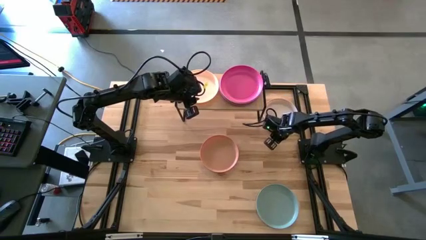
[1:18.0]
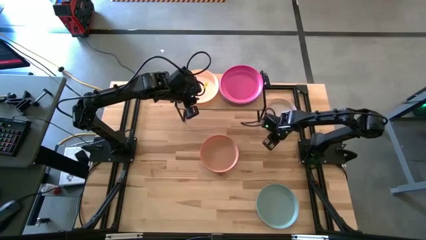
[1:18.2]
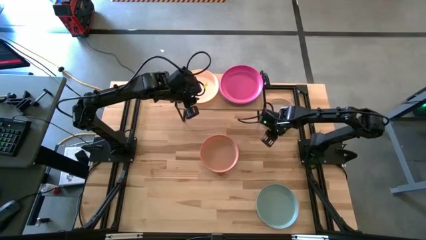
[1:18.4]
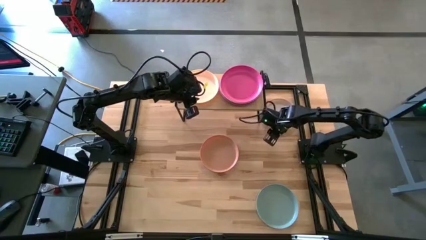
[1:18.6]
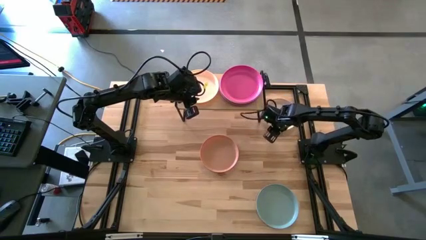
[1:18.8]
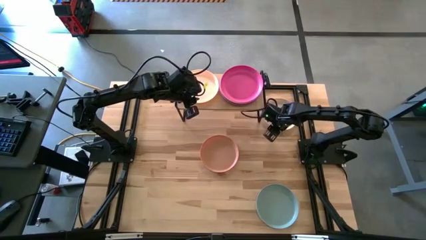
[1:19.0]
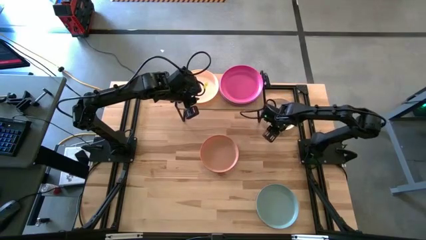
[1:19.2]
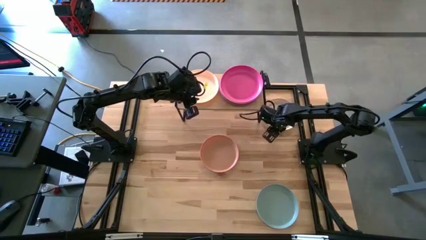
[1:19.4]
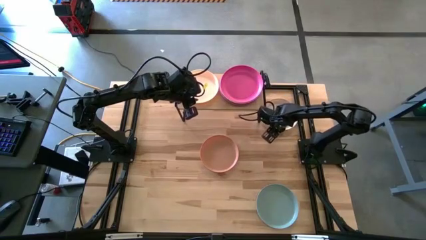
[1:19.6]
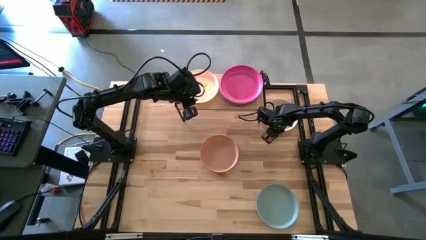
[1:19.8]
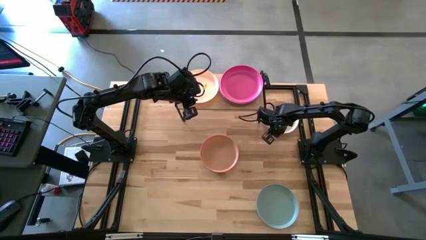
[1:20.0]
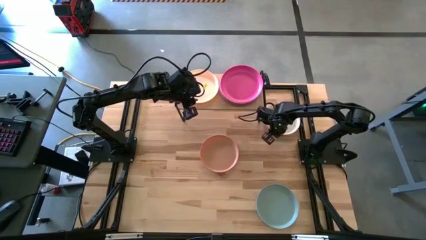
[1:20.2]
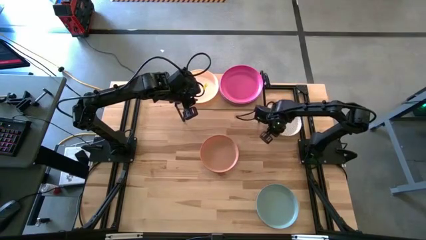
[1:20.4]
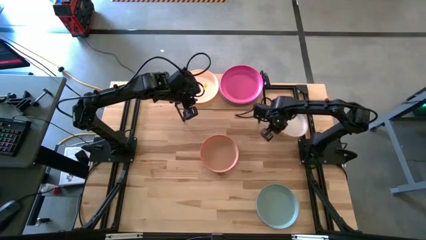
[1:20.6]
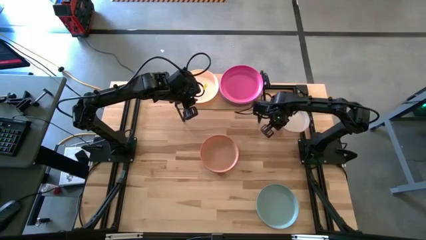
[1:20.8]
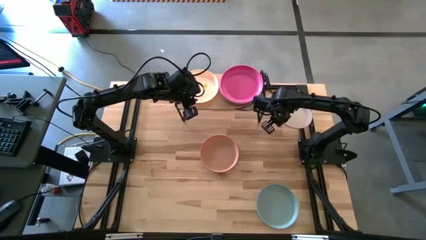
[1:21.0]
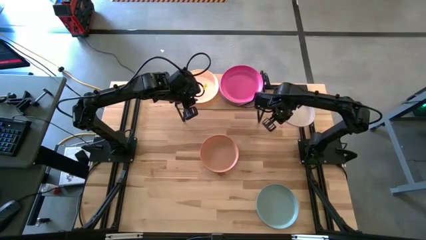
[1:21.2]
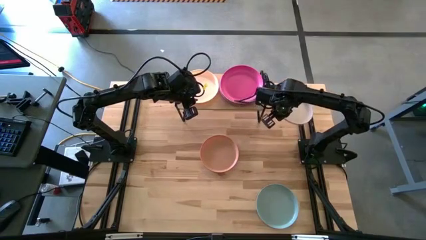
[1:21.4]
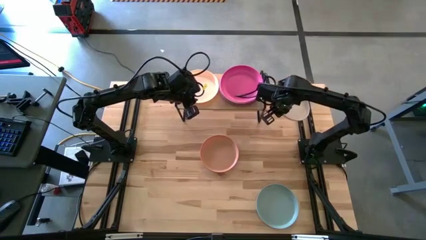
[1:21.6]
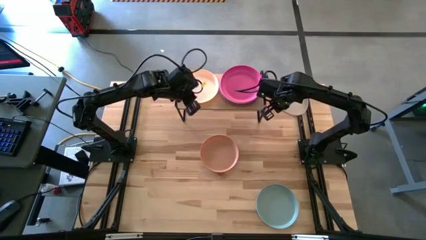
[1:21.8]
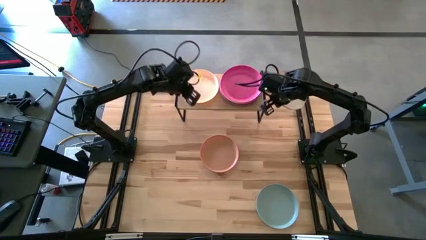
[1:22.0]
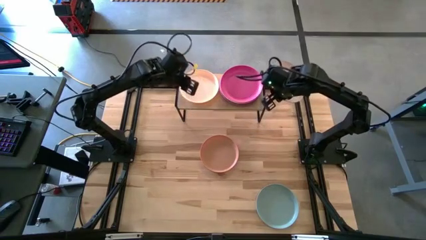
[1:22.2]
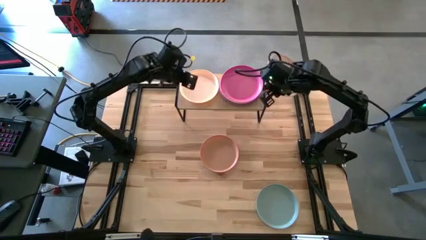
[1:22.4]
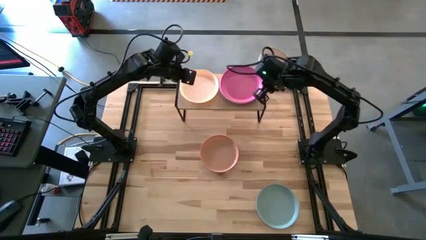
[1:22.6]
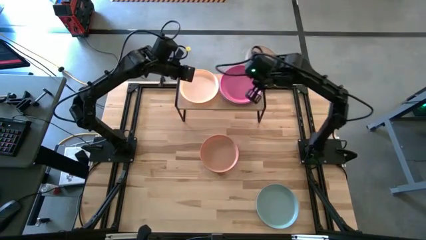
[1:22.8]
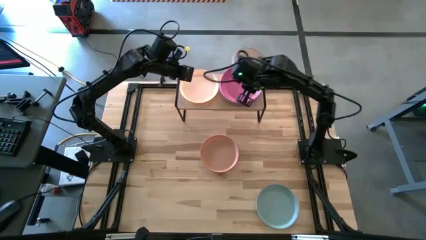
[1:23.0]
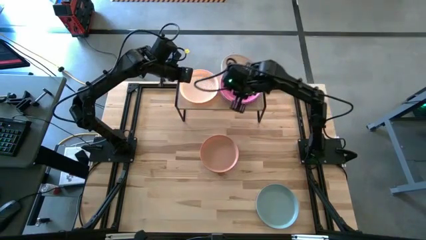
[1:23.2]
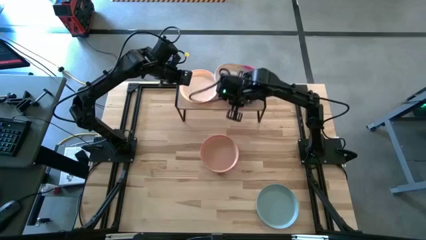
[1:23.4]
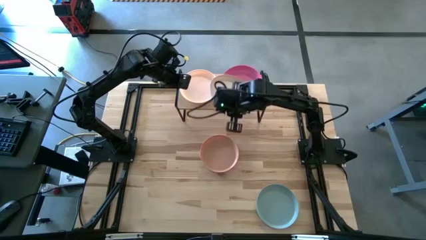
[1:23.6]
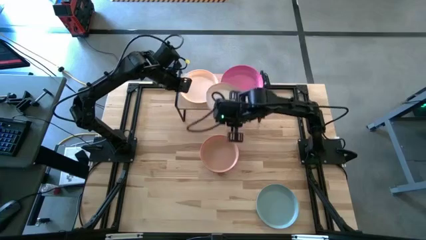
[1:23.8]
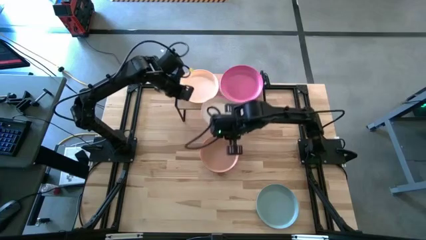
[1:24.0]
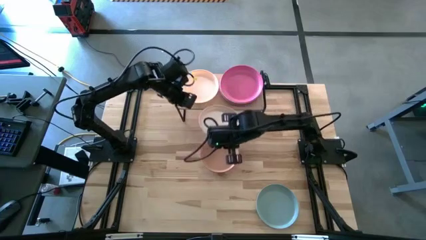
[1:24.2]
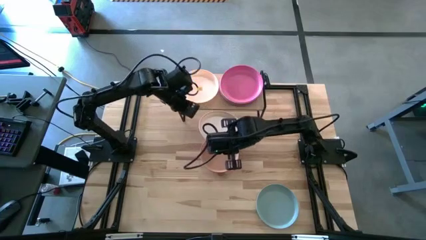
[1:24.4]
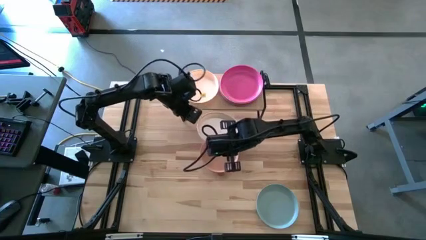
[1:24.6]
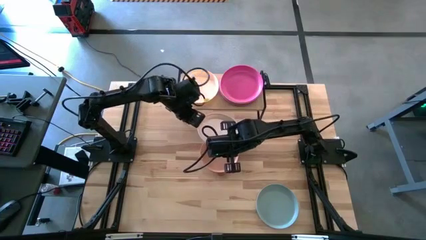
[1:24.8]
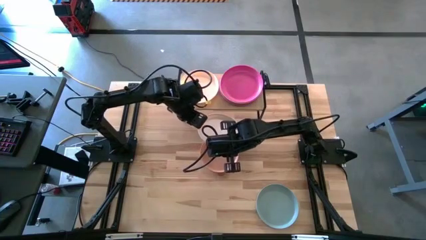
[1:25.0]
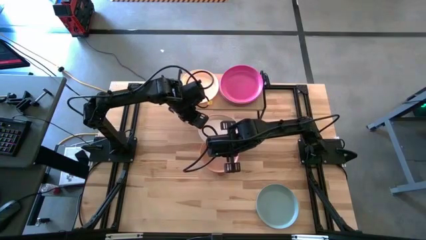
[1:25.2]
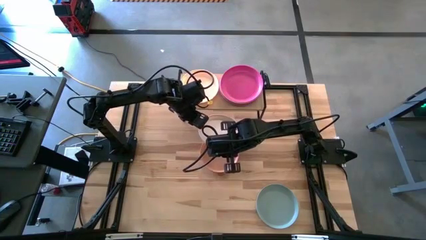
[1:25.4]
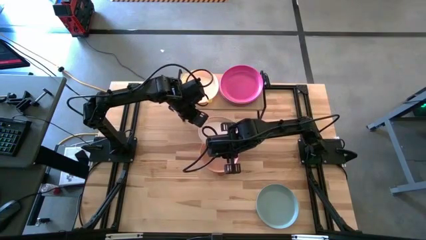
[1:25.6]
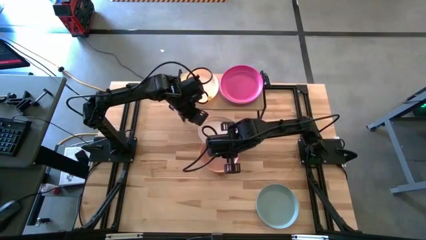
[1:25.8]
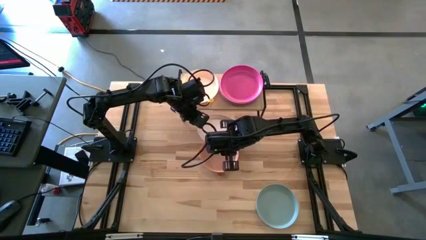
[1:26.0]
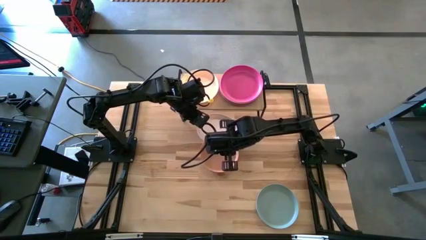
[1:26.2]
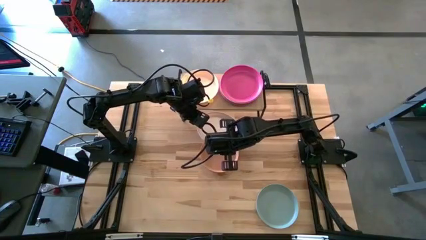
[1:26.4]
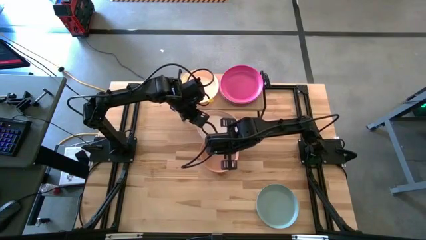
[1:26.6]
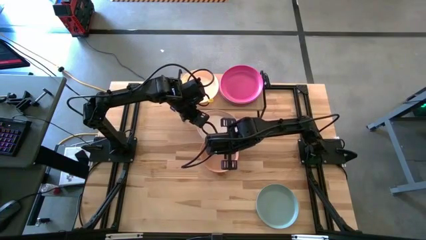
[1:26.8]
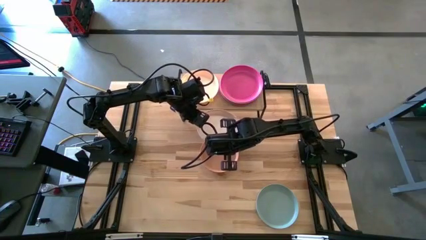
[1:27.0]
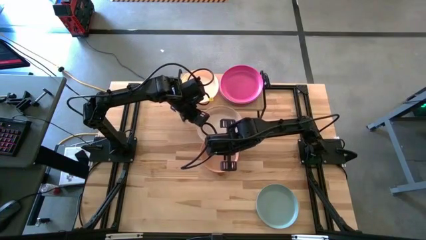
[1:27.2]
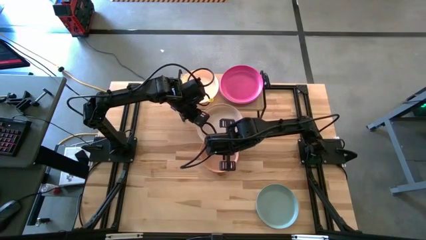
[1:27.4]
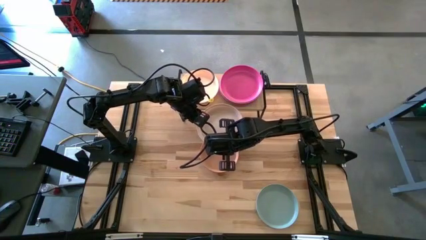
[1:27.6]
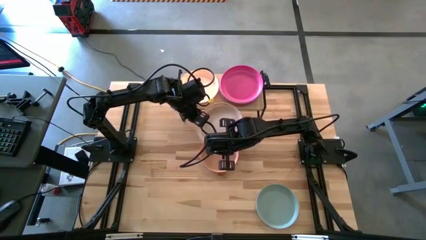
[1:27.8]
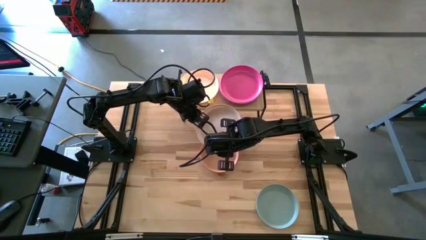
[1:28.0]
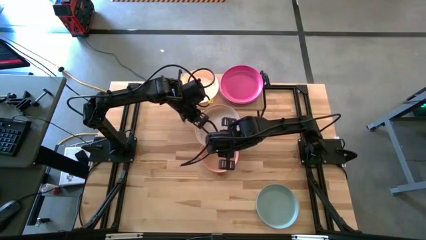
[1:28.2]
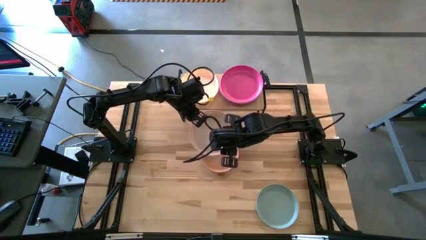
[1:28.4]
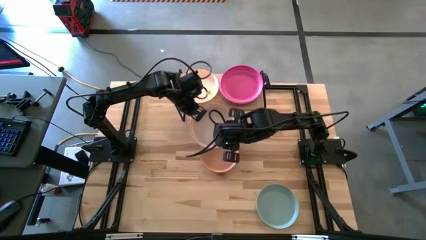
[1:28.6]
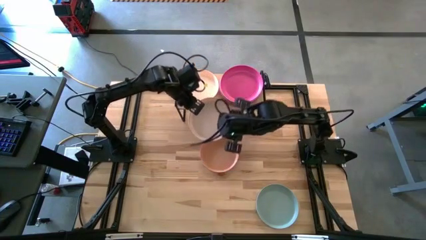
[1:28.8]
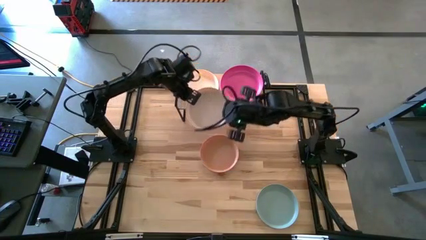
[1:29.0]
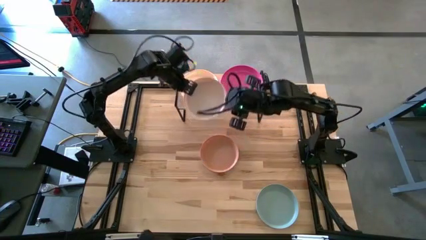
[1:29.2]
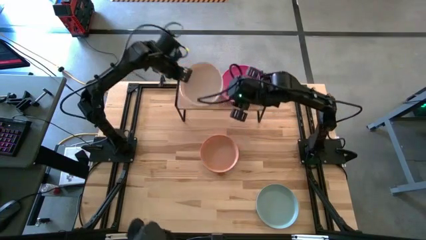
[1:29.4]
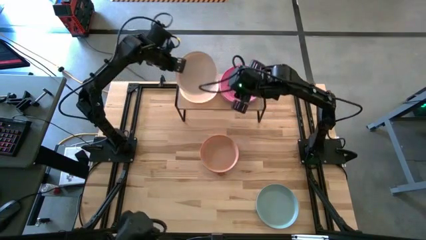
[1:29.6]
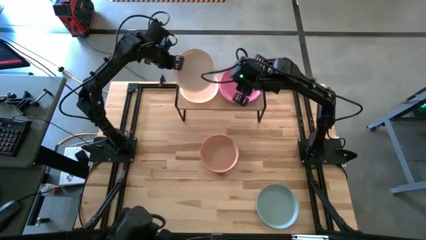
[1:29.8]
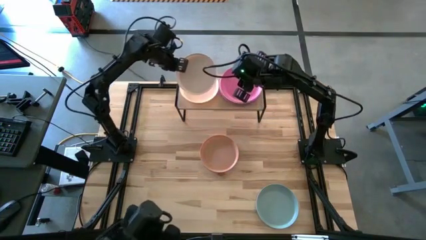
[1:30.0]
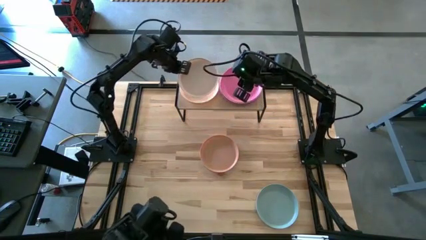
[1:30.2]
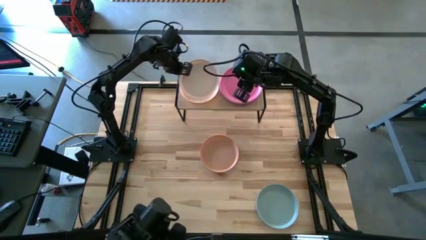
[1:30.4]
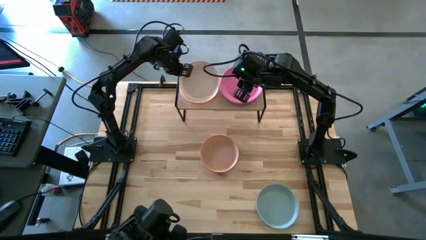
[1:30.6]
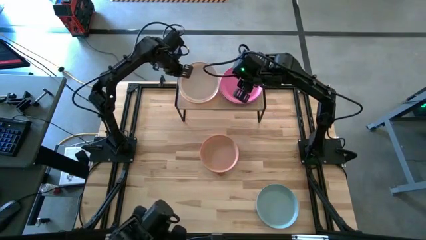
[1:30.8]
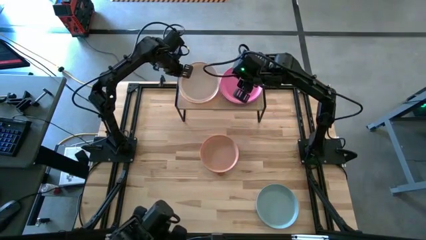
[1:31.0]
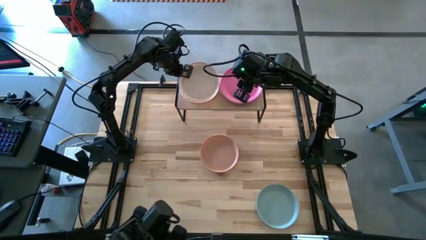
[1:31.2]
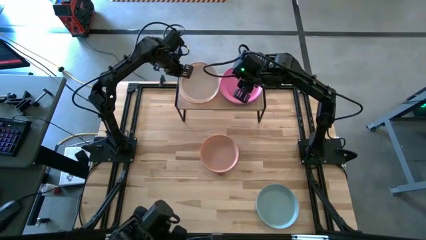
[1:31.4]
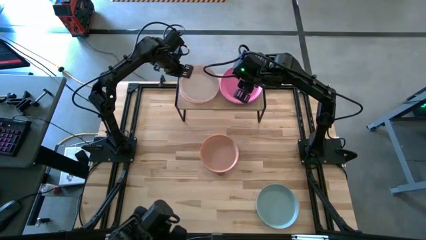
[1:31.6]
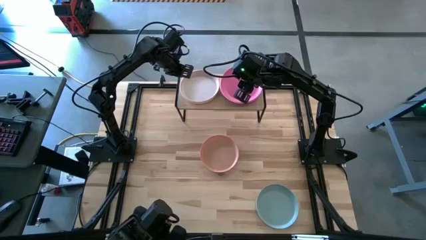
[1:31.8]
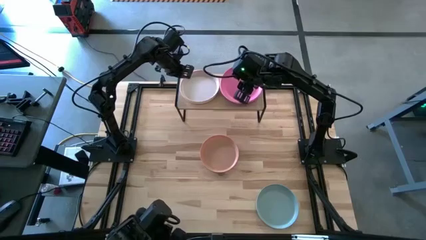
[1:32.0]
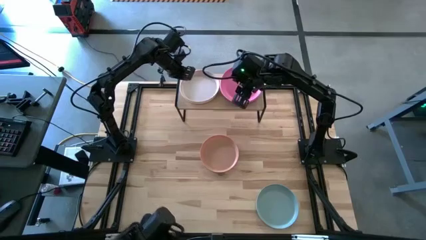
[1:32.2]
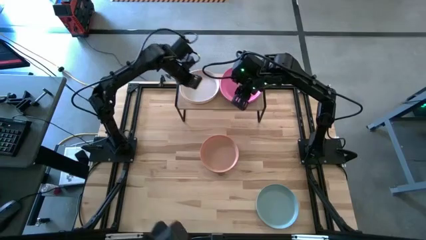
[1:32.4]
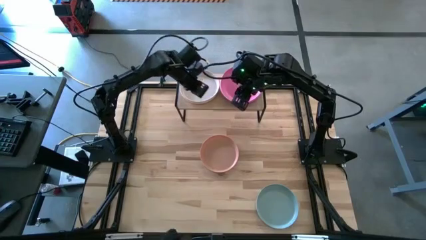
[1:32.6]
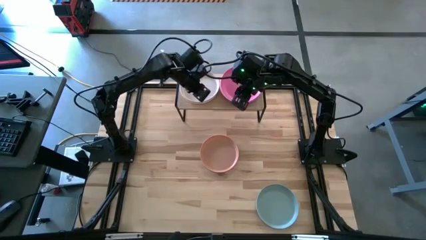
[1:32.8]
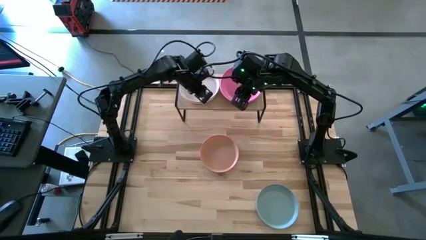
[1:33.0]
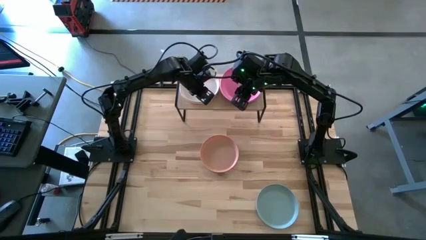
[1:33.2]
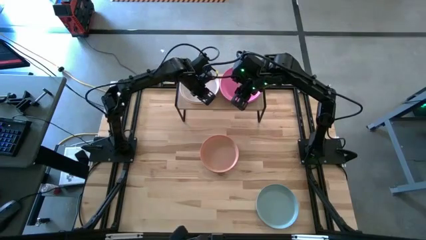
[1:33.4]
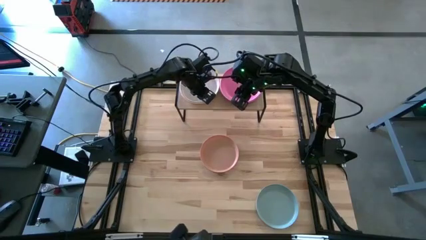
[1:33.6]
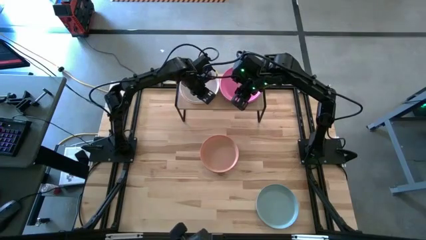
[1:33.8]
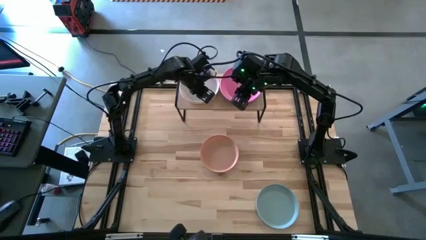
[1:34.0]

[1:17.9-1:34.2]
Task: Place and stack plates onto a shelf
Stack the white plate on top of the white plate

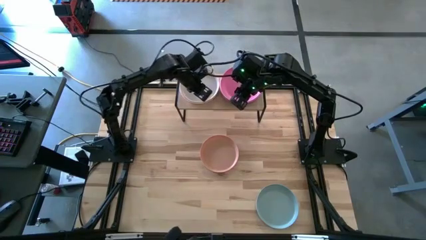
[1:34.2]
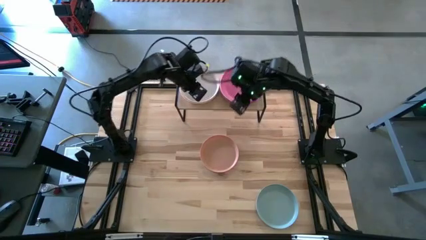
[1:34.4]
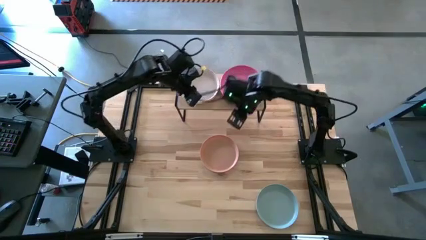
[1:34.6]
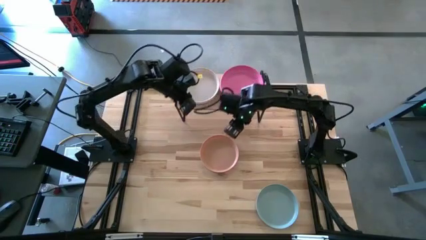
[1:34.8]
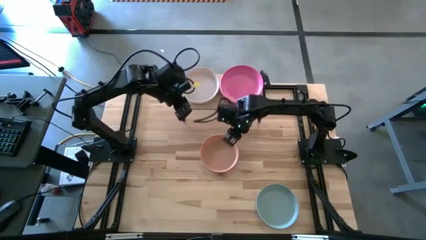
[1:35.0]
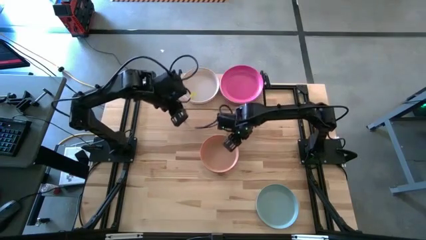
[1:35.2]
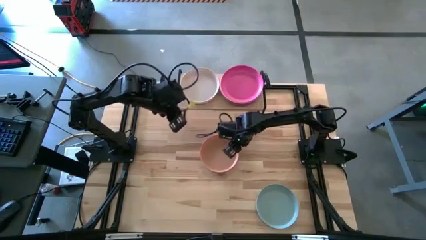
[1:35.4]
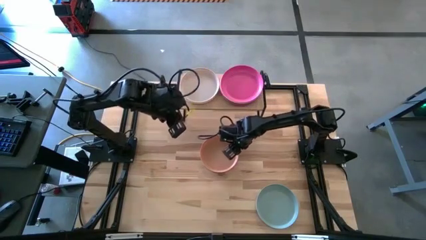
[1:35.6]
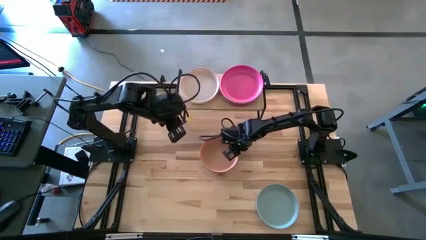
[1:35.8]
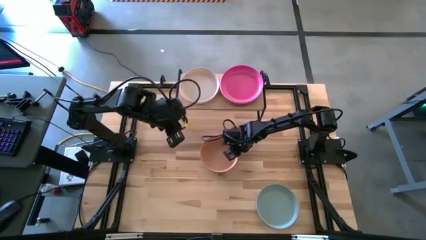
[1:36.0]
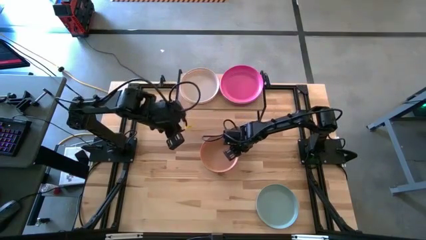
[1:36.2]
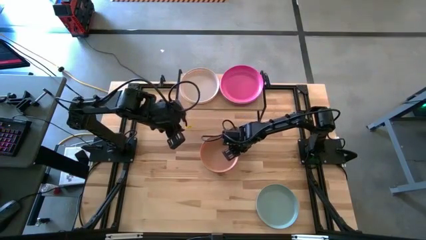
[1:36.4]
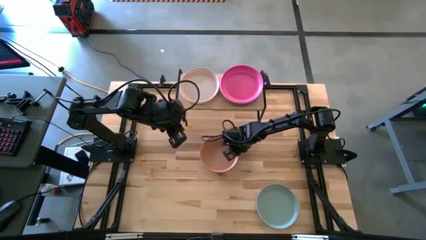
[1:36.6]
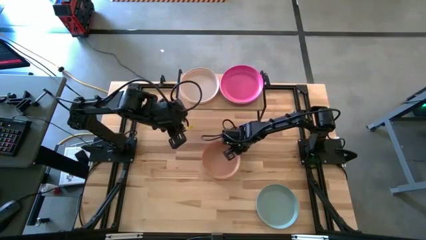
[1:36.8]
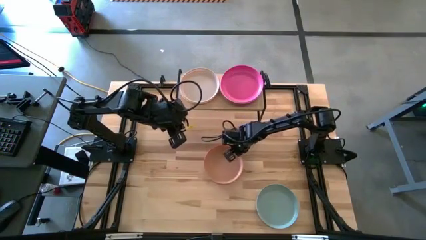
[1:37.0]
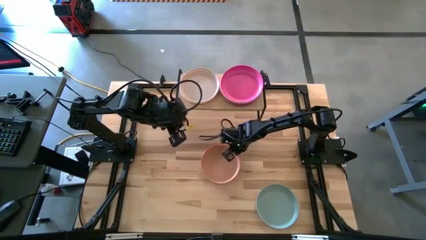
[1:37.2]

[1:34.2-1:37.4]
Stack the brown plate on top of the white plate
